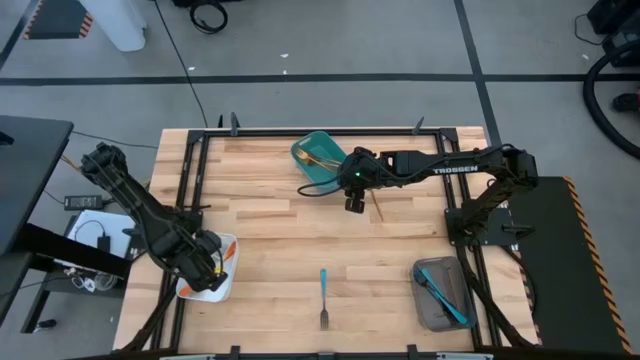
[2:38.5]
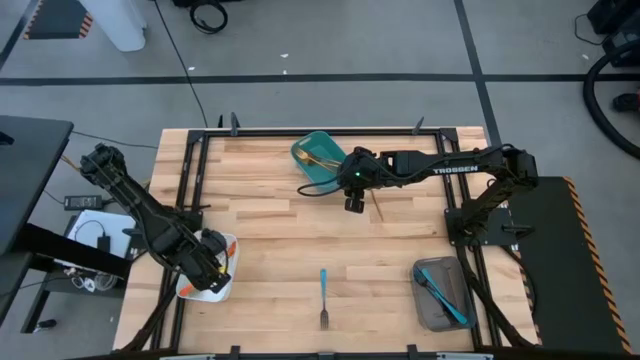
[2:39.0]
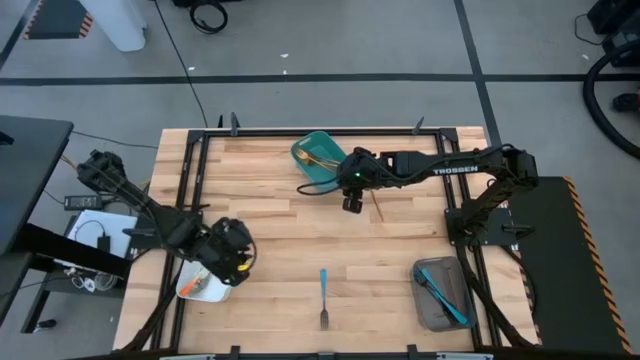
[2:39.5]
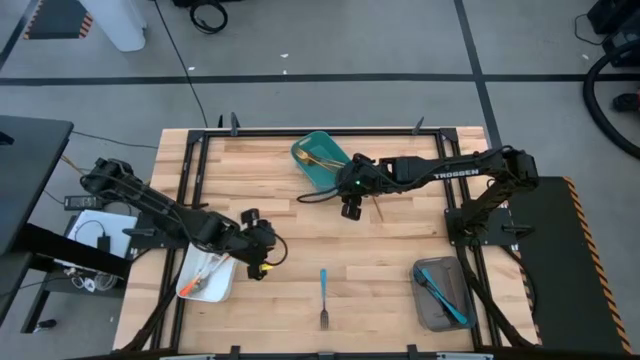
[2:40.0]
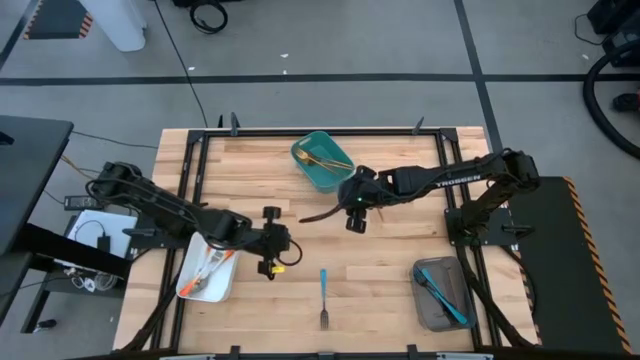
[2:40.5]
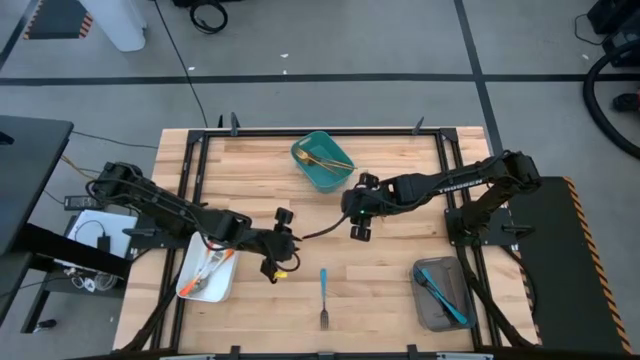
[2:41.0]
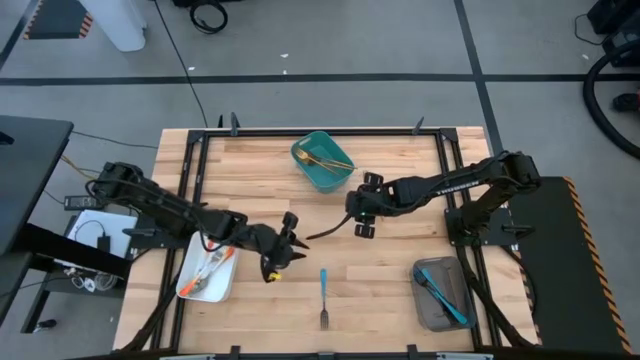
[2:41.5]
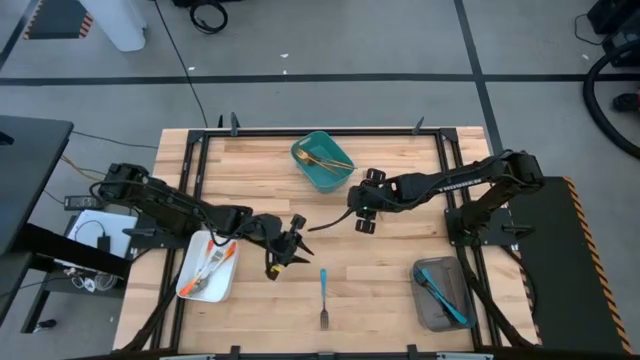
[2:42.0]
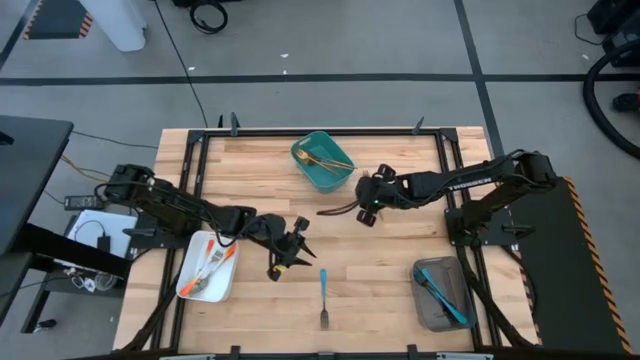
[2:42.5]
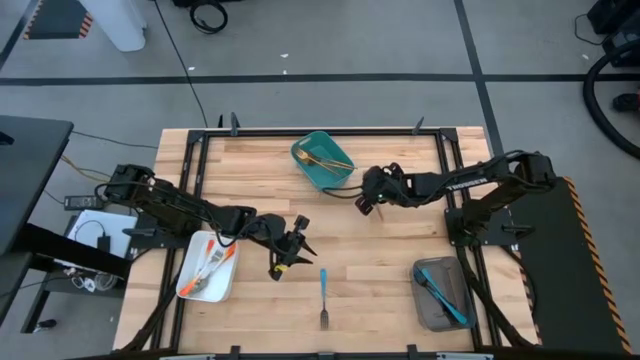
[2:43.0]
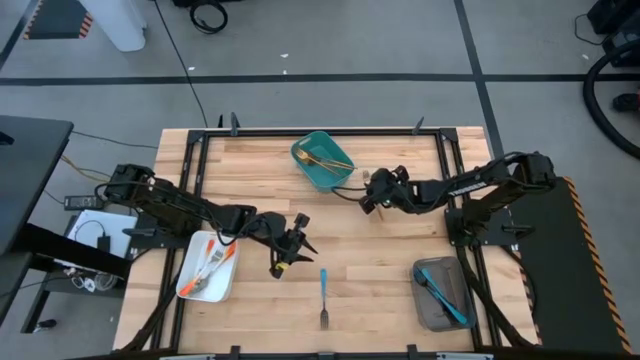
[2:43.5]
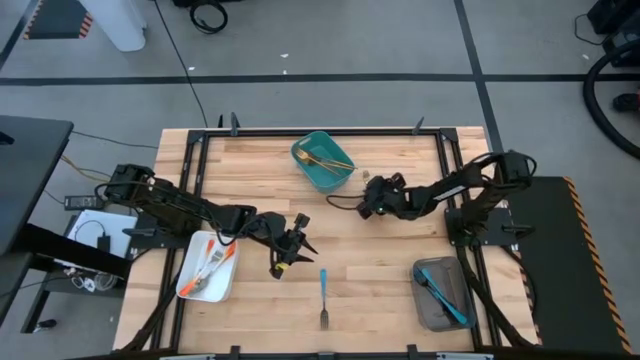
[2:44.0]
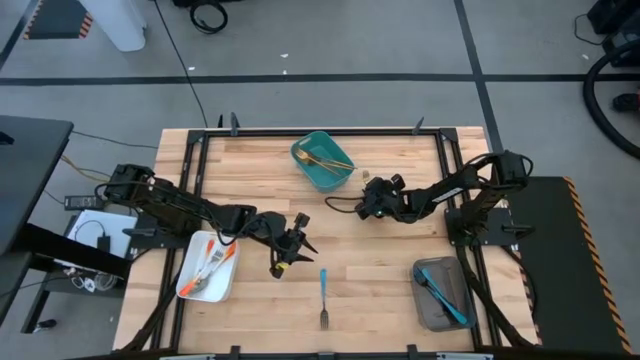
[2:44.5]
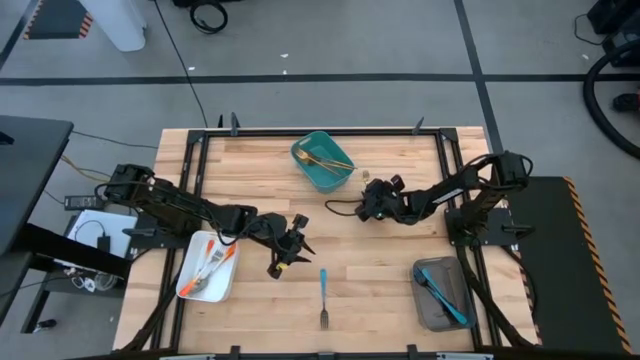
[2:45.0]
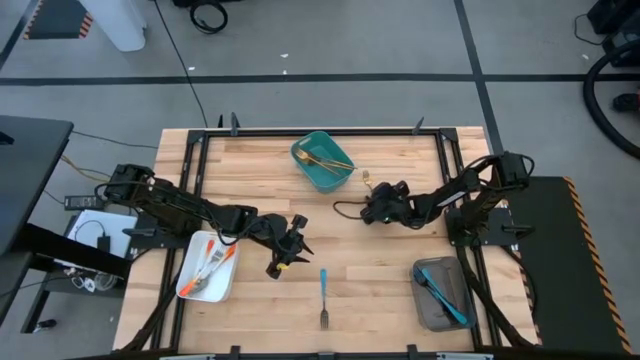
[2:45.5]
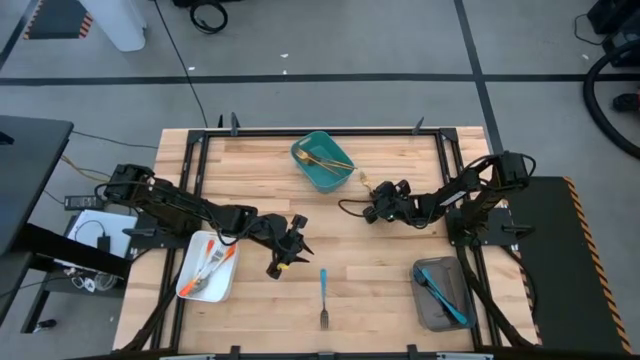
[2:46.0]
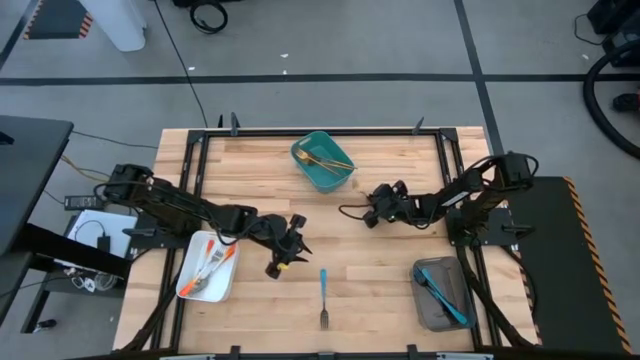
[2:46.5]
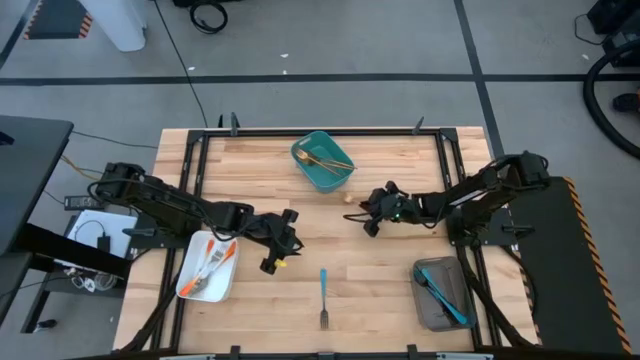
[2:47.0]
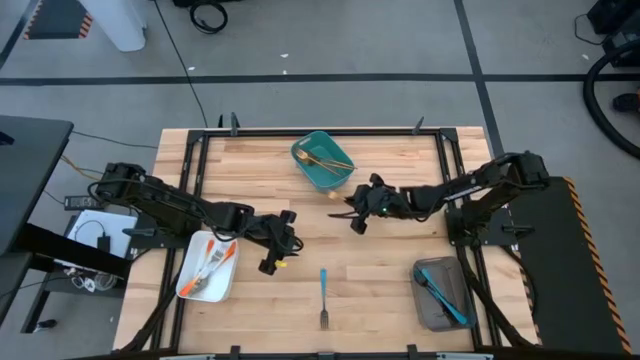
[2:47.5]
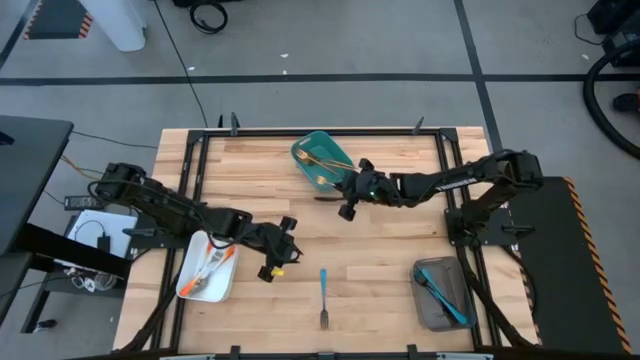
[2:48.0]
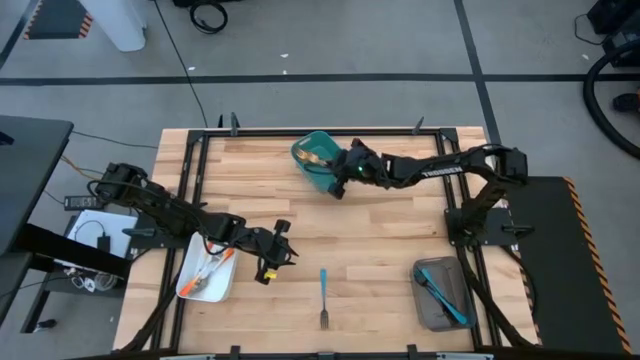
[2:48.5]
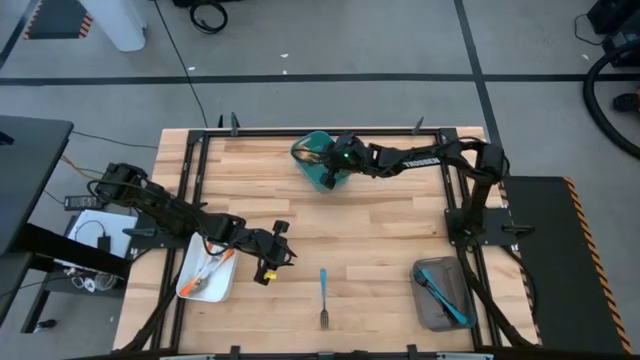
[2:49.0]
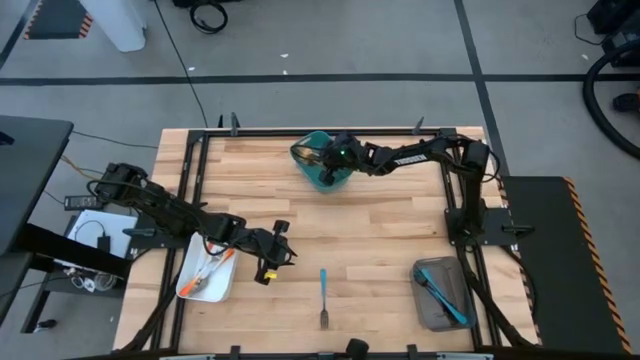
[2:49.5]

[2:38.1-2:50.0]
Task: Sort silverware by color (type)
Put the gold fork into the green bin

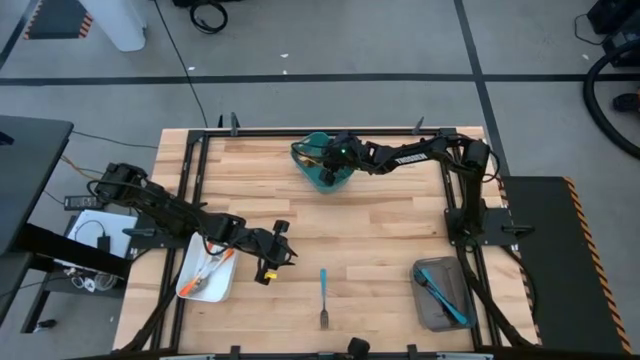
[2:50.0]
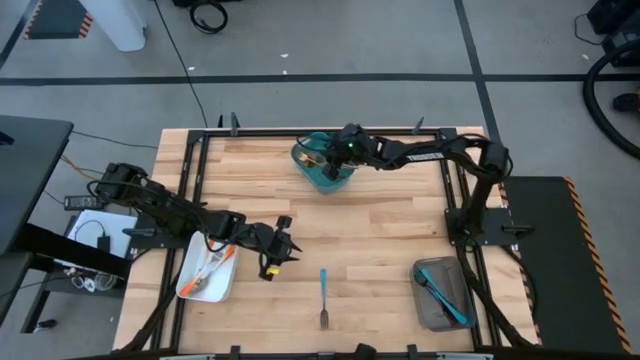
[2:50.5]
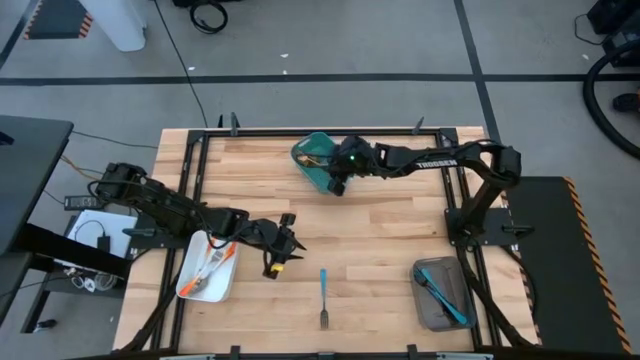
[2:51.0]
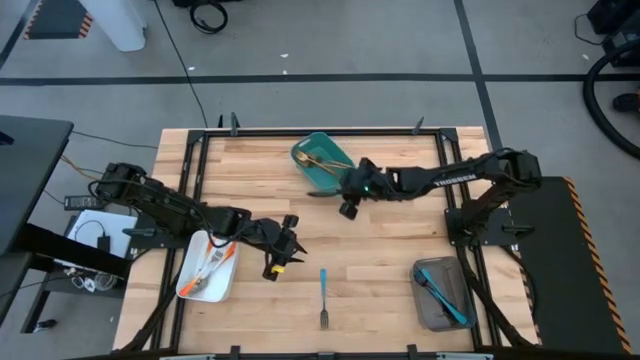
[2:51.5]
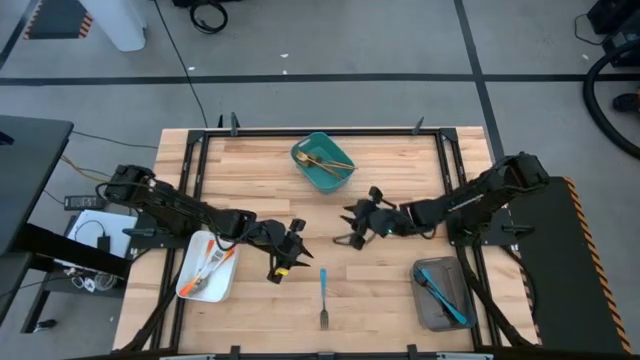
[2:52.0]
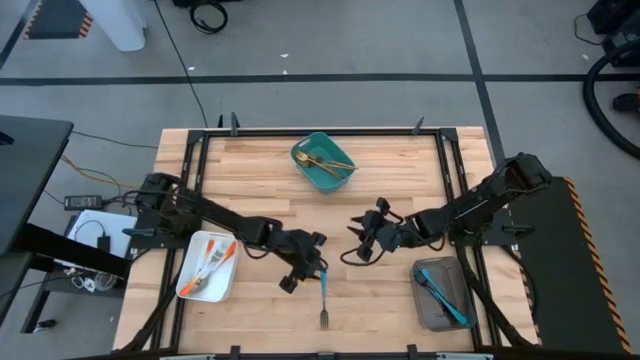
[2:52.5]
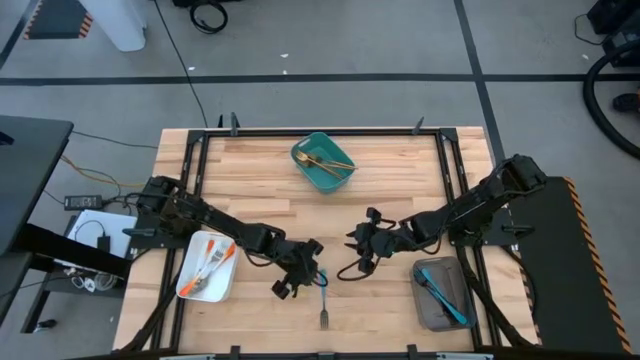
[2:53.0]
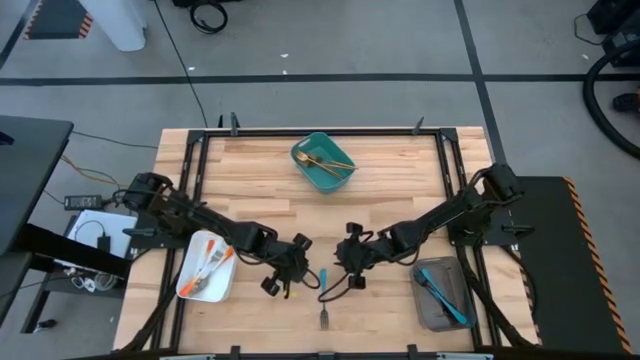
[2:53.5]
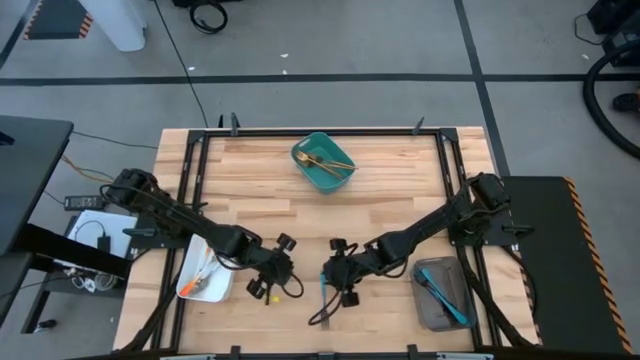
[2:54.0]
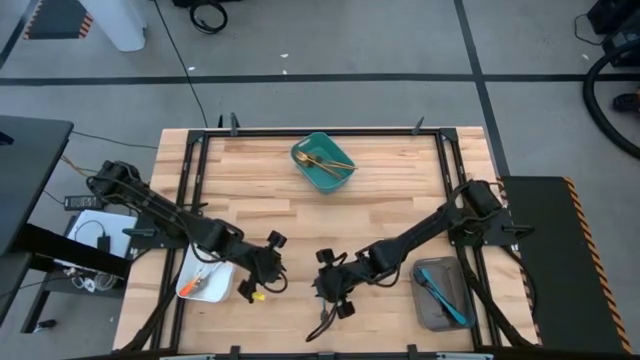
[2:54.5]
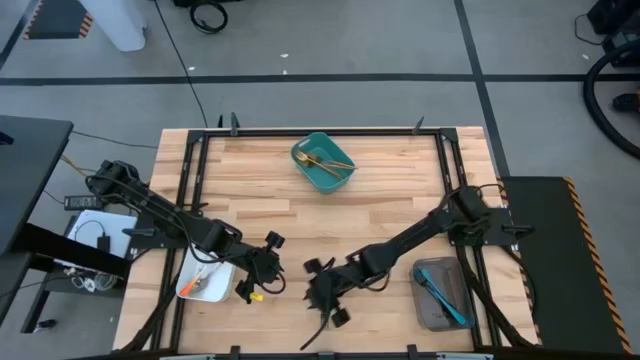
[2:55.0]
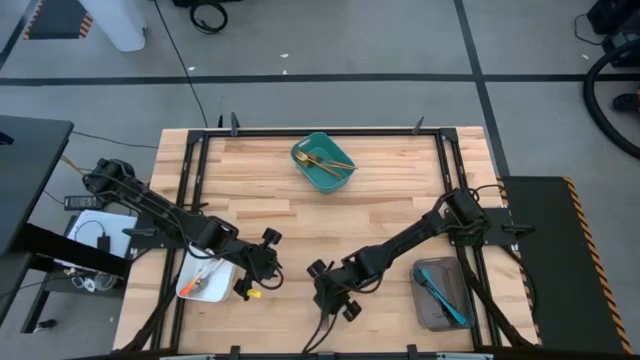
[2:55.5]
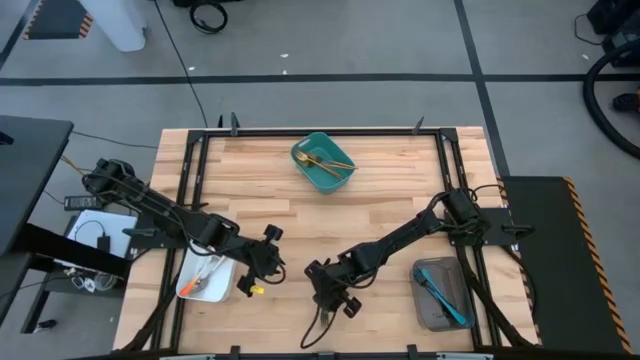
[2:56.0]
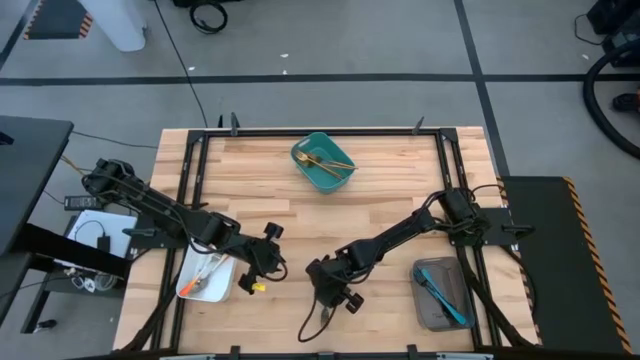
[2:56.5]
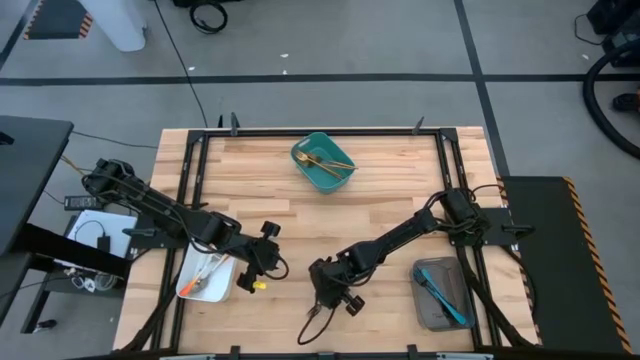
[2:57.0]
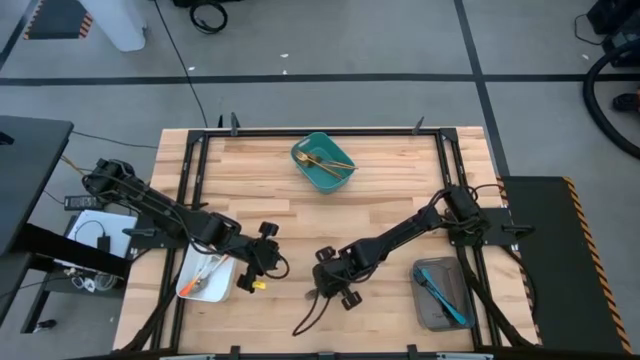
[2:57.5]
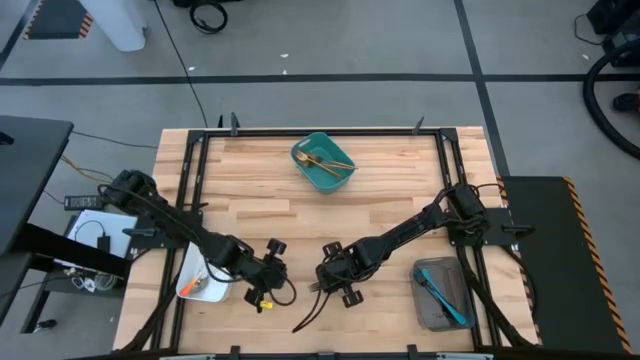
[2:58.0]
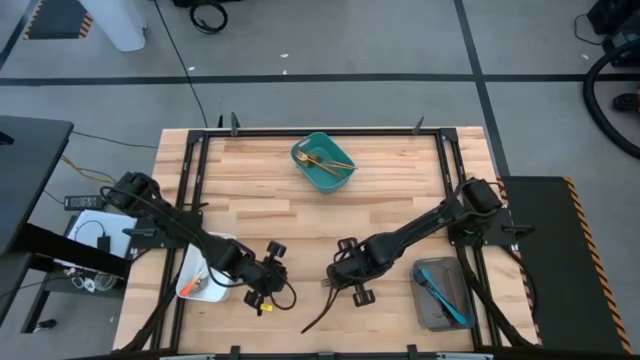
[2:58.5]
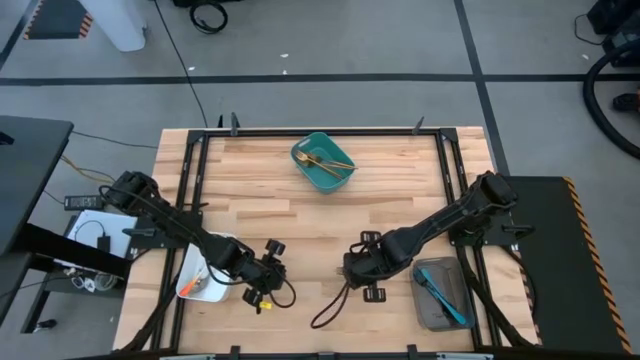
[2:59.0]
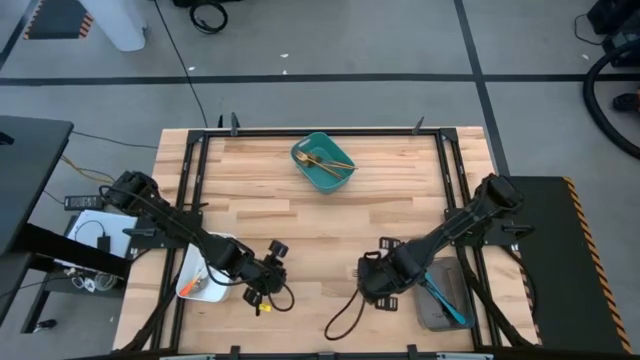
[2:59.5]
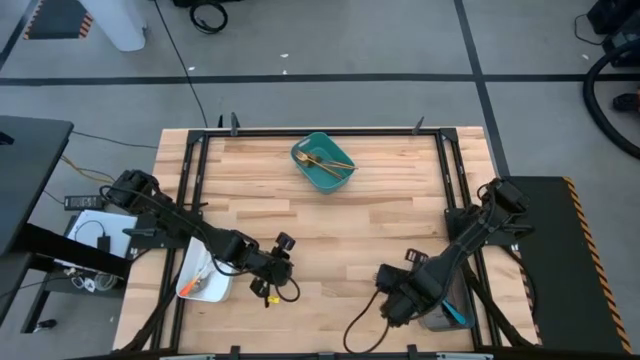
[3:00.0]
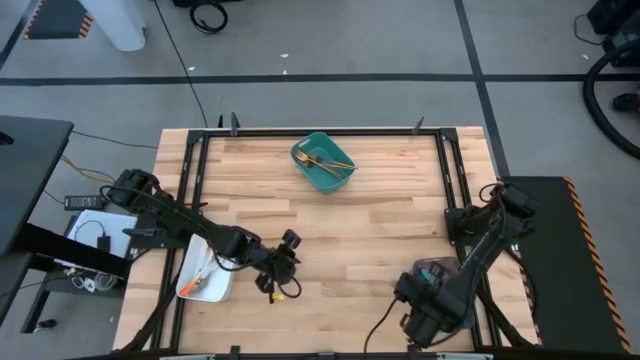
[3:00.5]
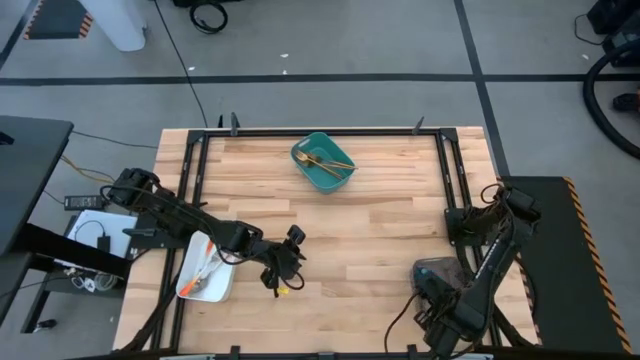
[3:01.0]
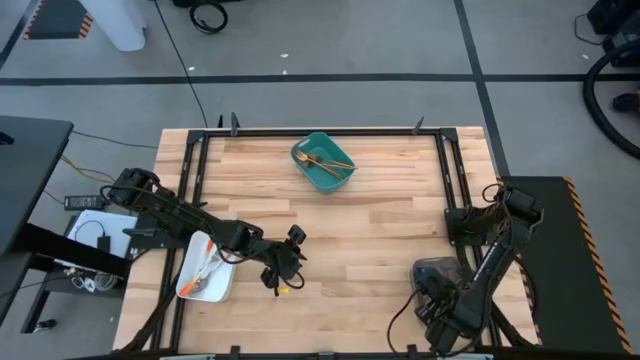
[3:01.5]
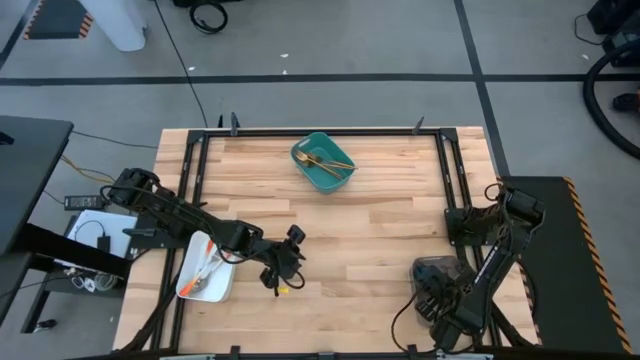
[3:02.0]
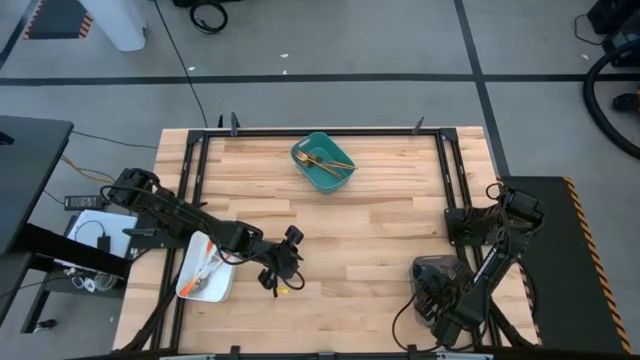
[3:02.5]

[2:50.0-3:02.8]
Put the fork into the white bin
